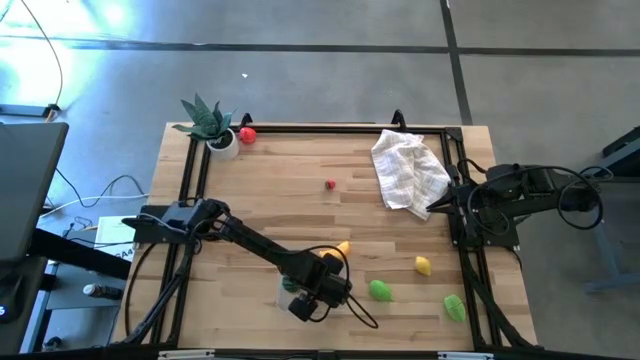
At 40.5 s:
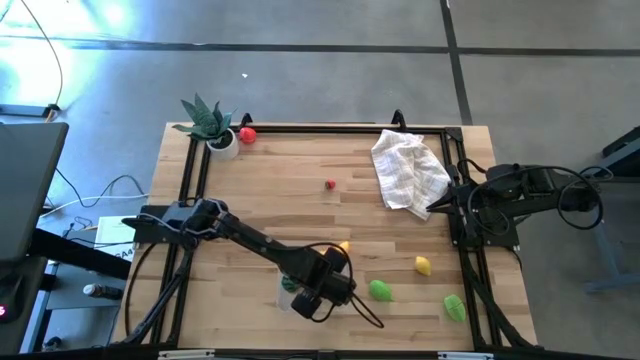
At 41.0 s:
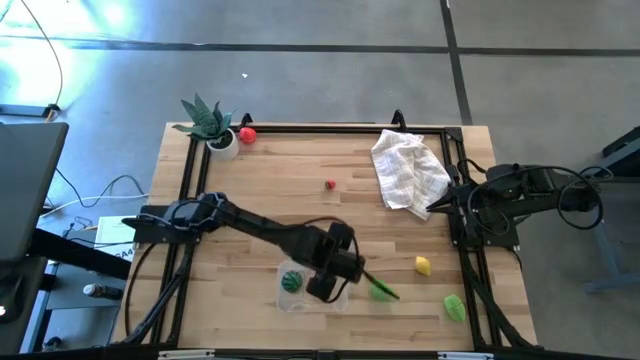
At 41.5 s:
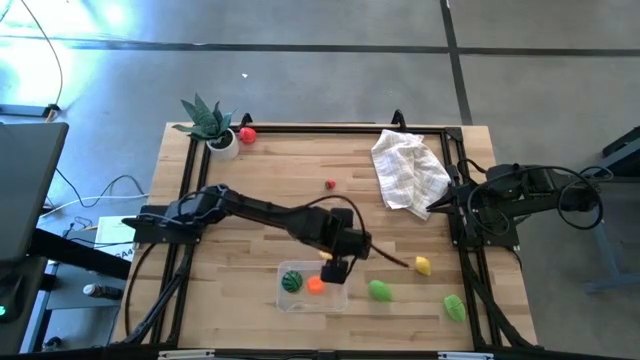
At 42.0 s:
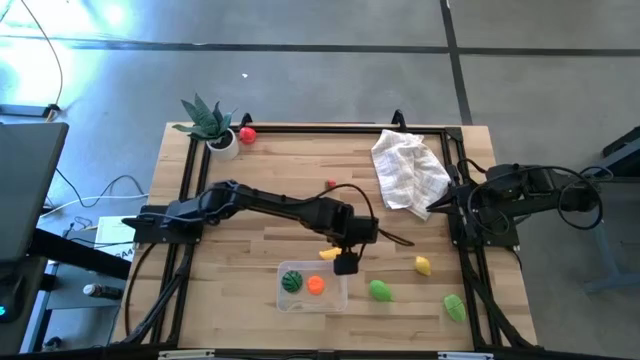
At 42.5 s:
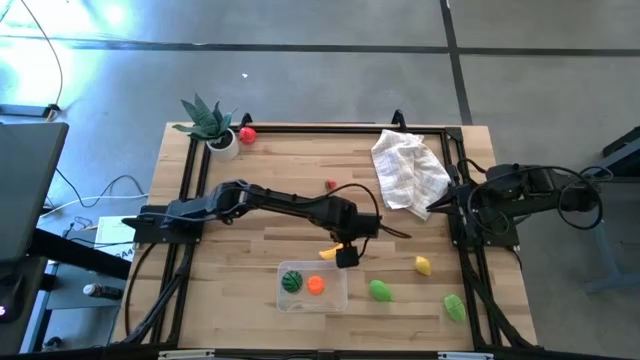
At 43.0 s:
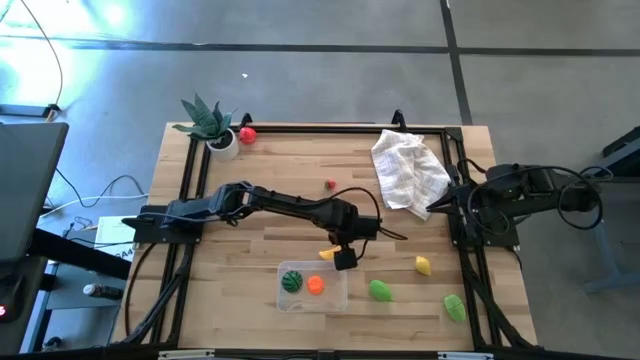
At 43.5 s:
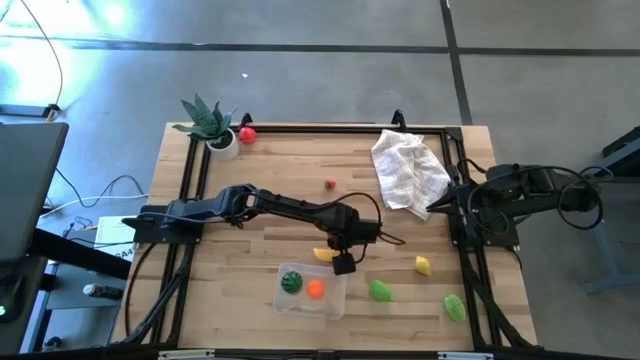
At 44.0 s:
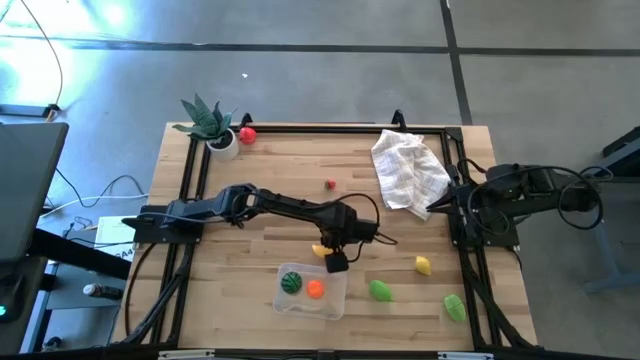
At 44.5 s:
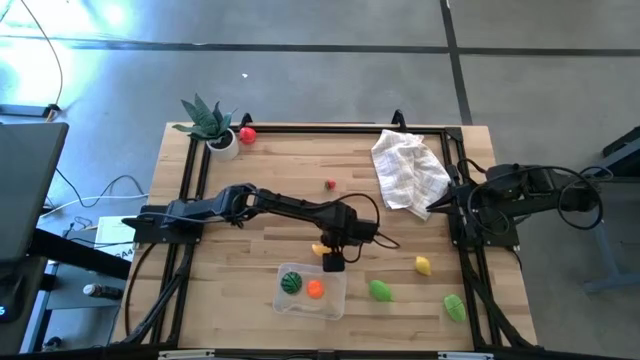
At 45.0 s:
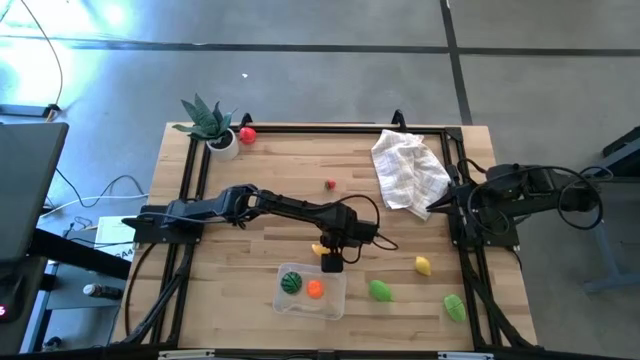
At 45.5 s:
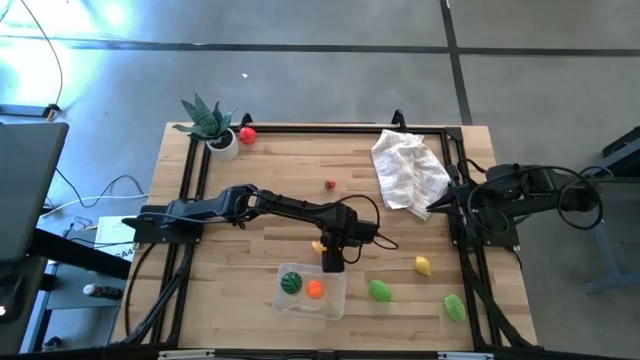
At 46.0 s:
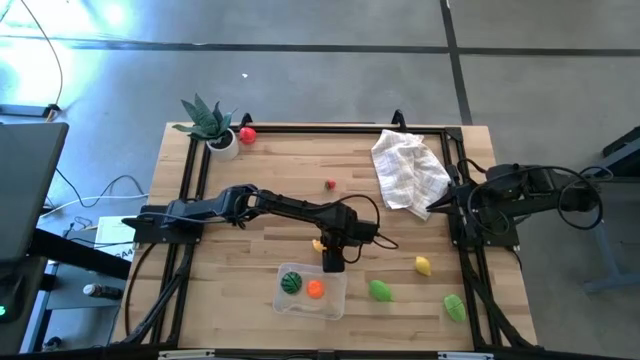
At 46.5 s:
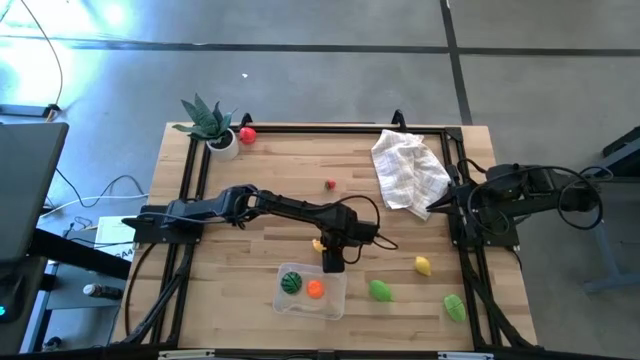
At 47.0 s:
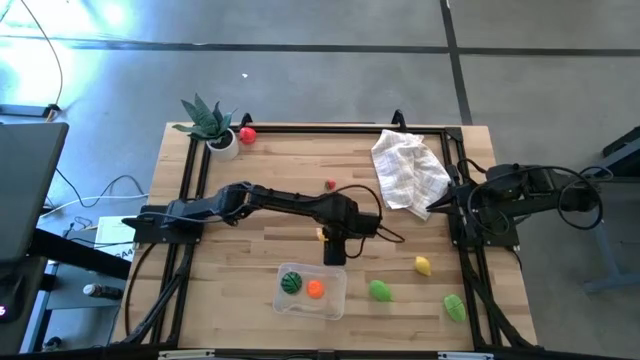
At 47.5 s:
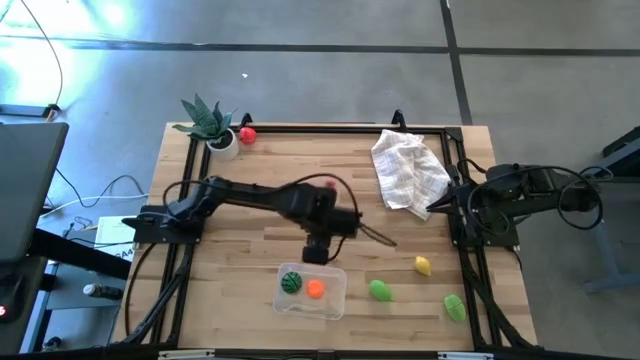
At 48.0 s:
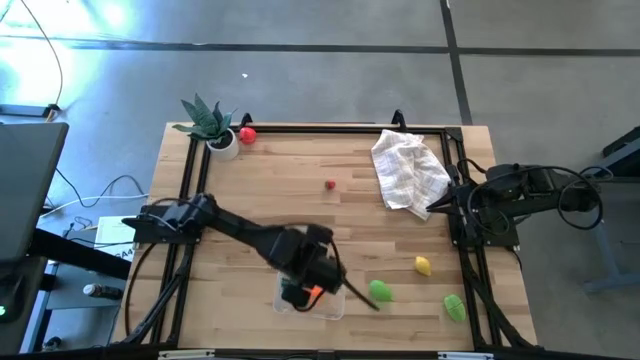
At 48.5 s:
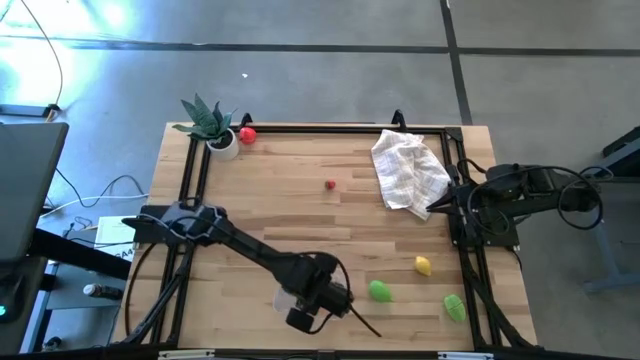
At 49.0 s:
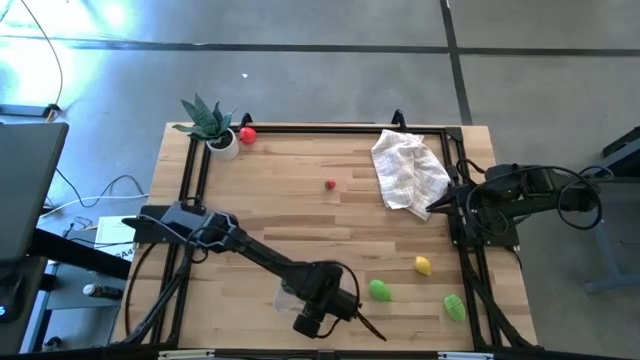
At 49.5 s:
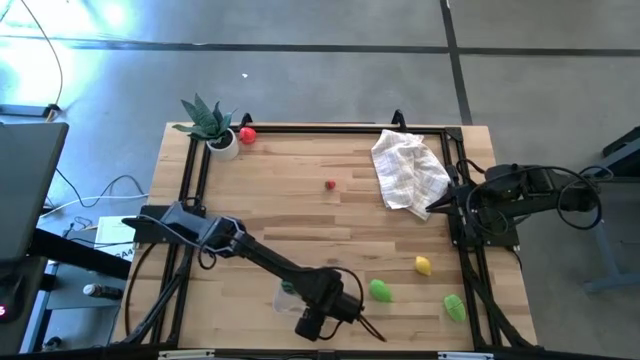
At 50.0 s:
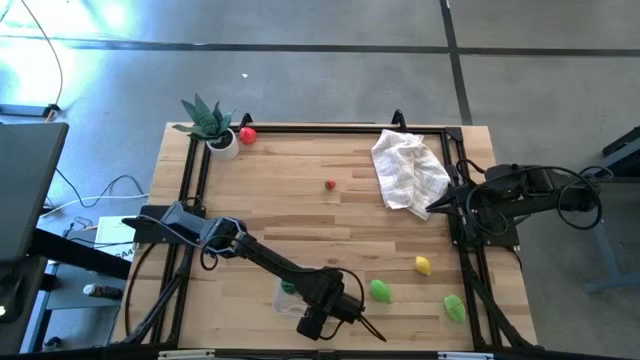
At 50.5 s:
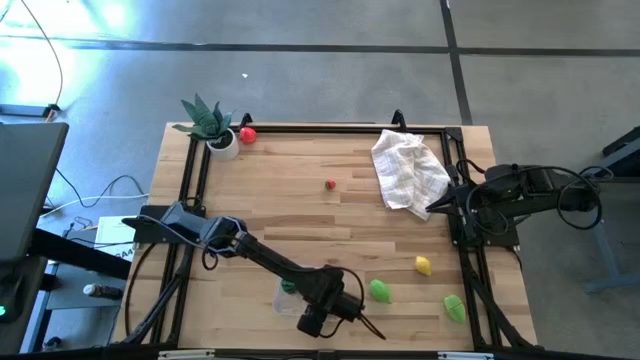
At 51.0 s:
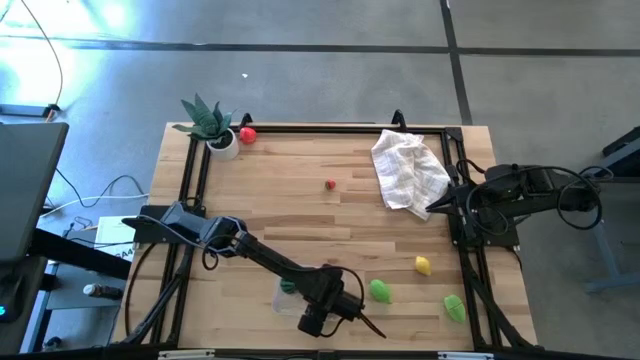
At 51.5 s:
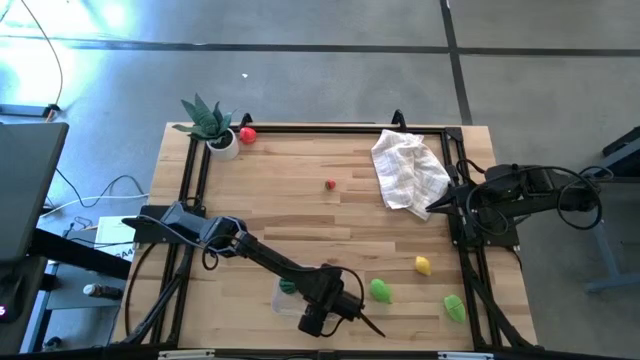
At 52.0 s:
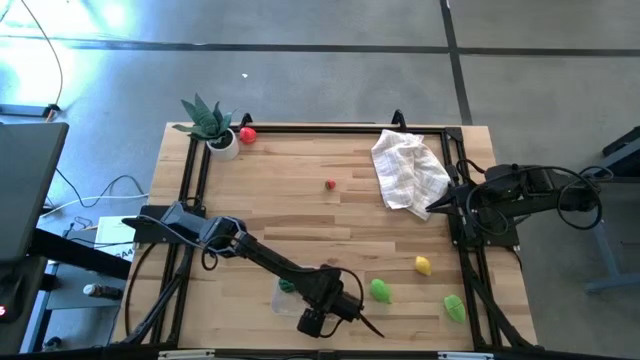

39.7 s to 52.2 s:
Task: Pick and placing Produce into tupperware
Put the banana into the bin

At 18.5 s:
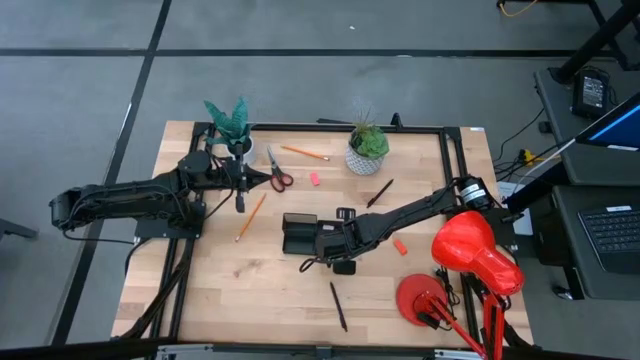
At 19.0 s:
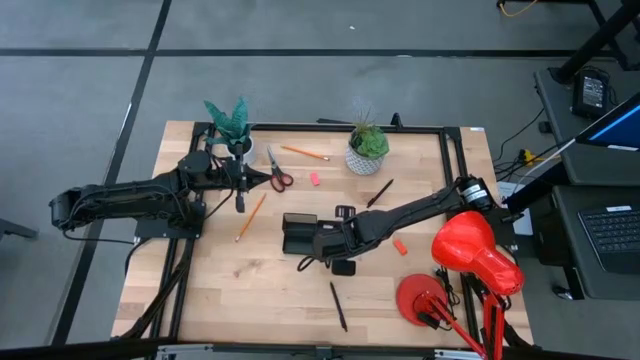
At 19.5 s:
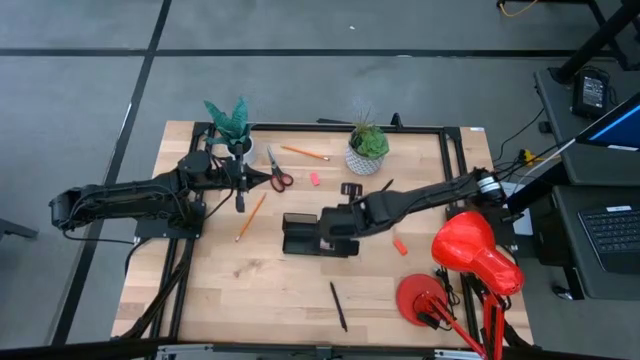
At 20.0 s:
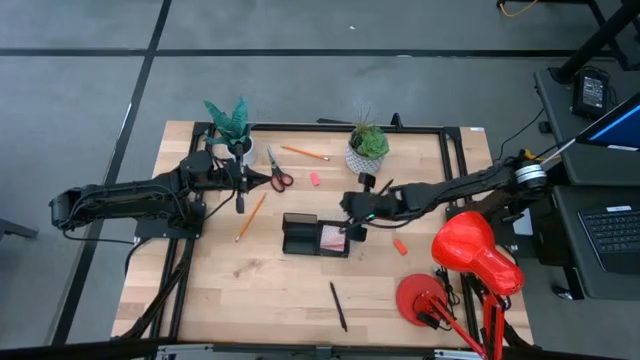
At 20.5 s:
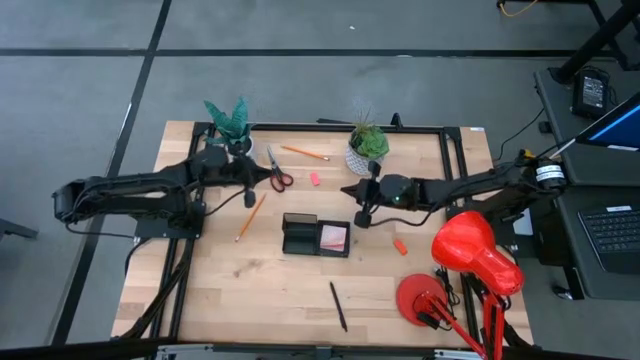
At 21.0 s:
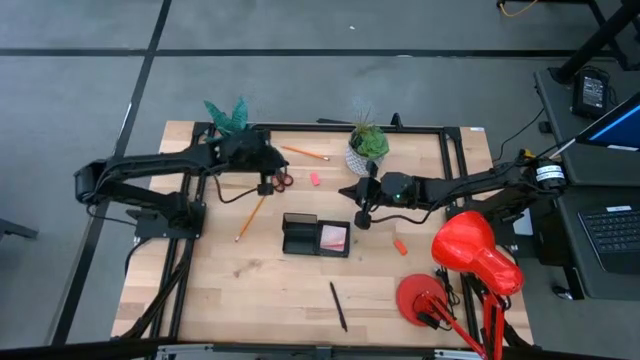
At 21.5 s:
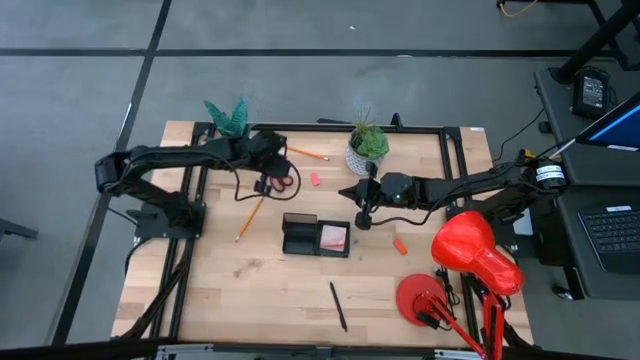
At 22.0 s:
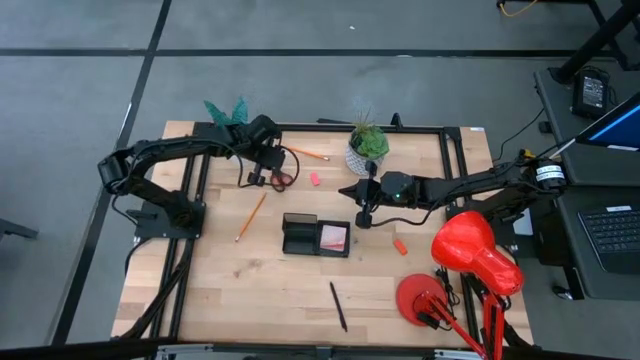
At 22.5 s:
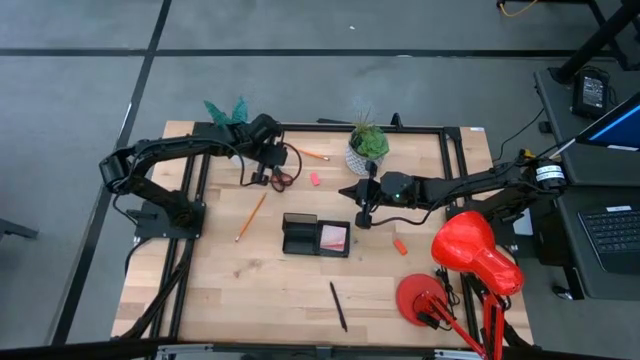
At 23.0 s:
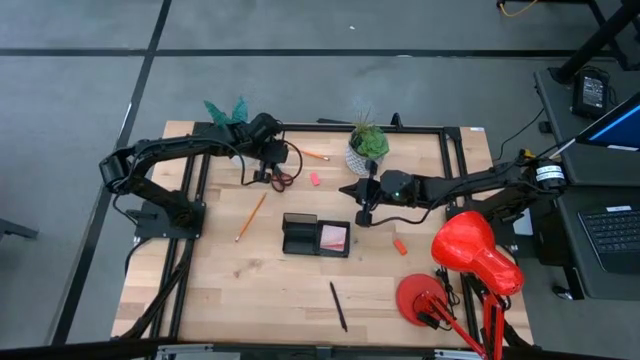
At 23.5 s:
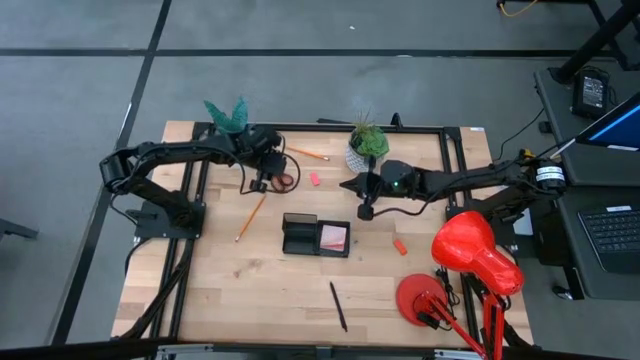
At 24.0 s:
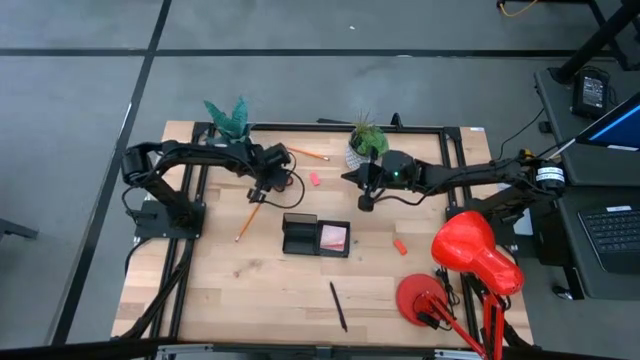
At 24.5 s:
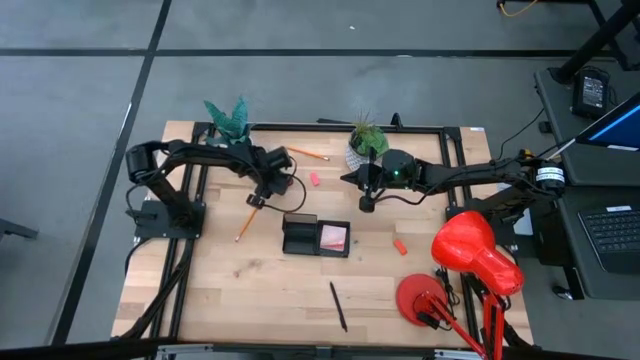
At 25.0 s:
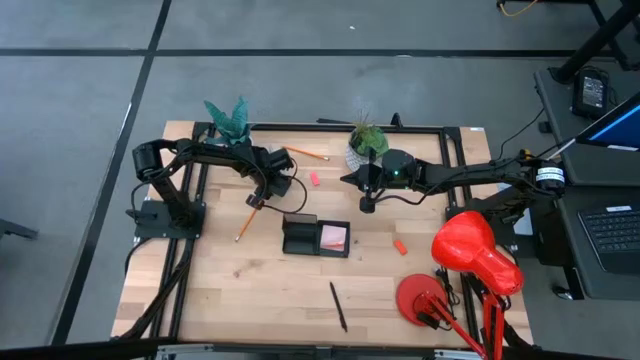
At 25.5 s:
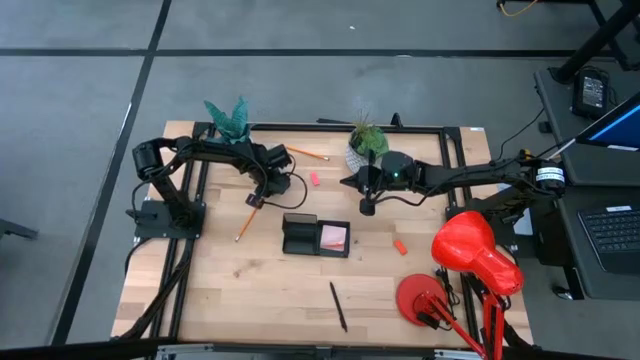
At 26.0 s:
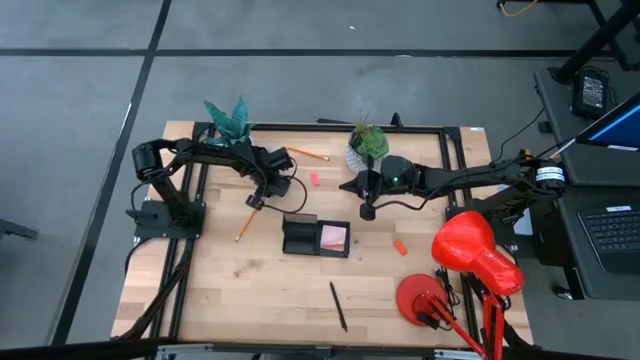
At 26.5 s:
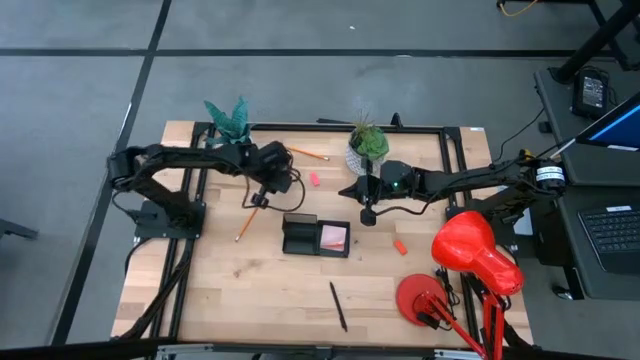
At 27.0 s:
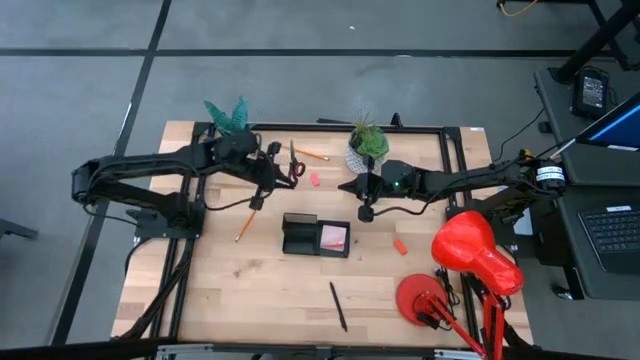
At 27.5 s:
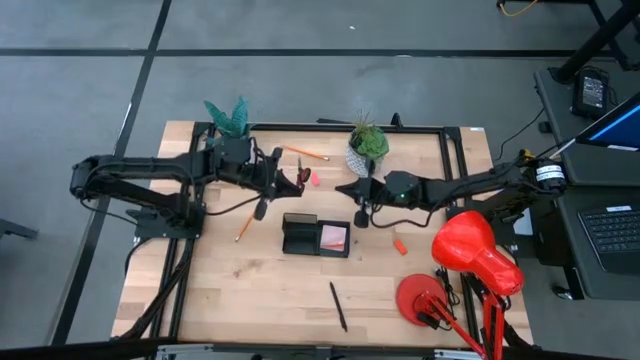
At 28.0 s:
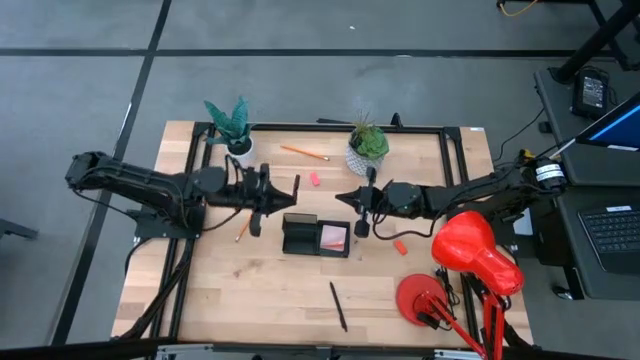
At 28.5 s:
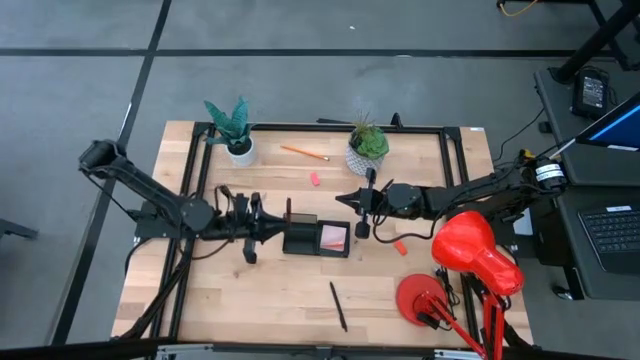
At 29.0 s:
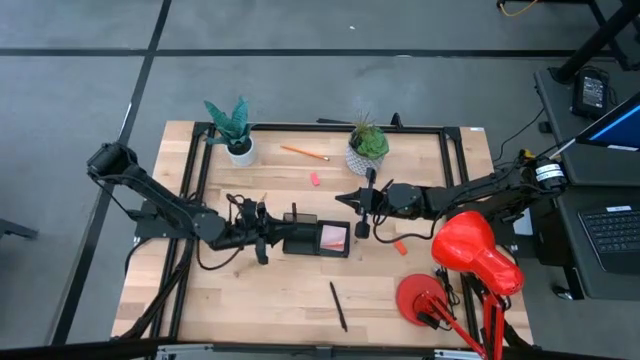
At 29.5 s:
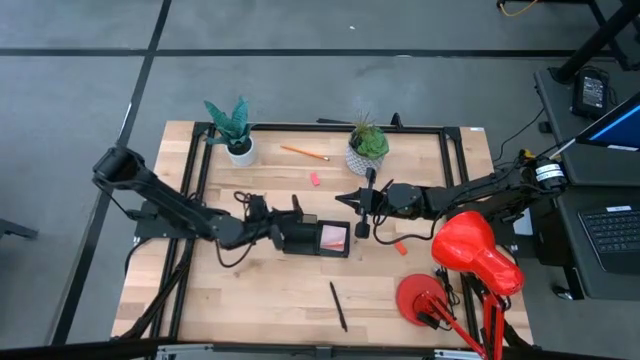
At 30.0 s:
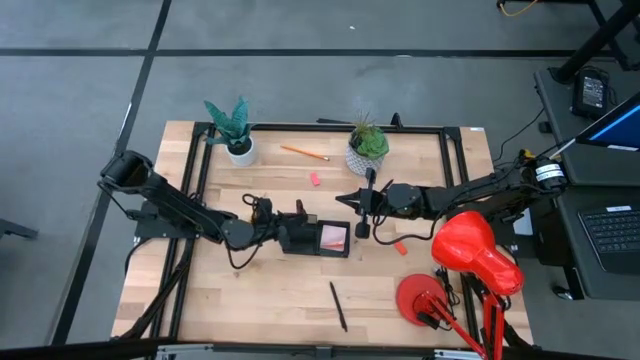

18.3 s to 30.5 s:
Task: Pick and place office supplies into organizer
Put the black scissor into the desk organizer
